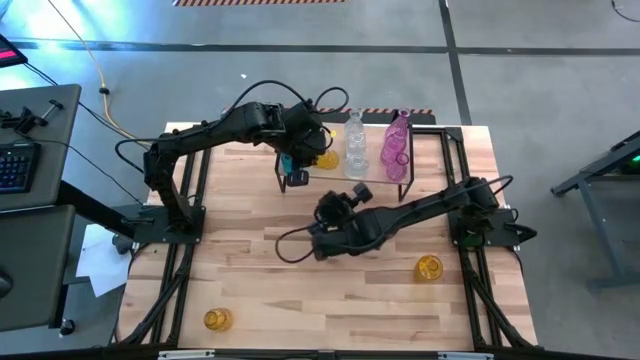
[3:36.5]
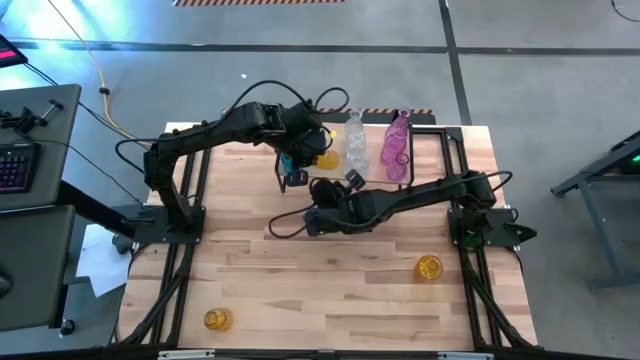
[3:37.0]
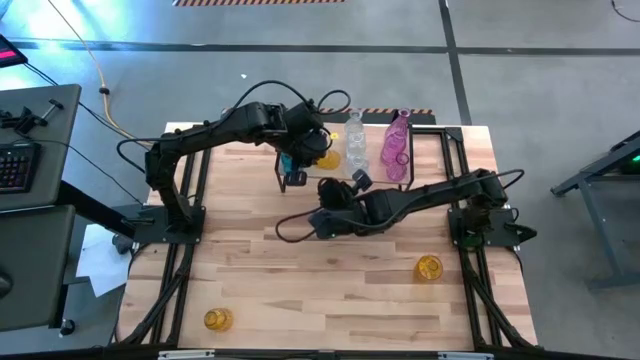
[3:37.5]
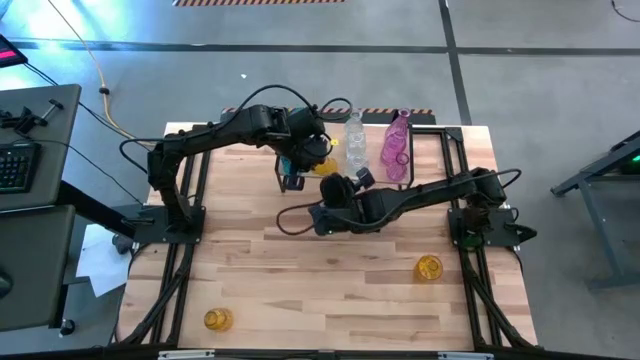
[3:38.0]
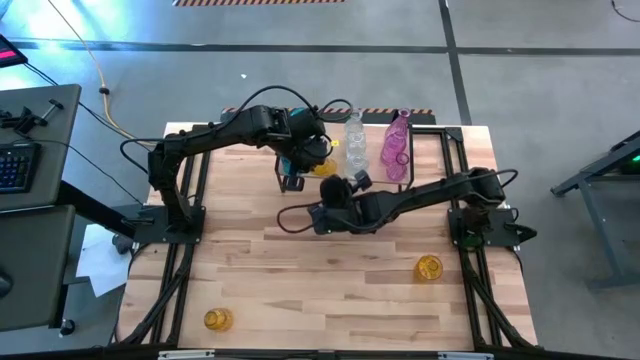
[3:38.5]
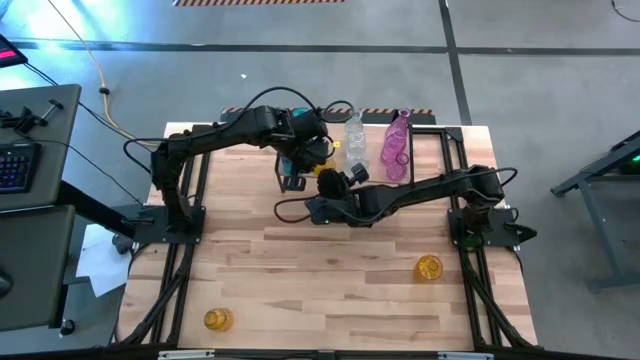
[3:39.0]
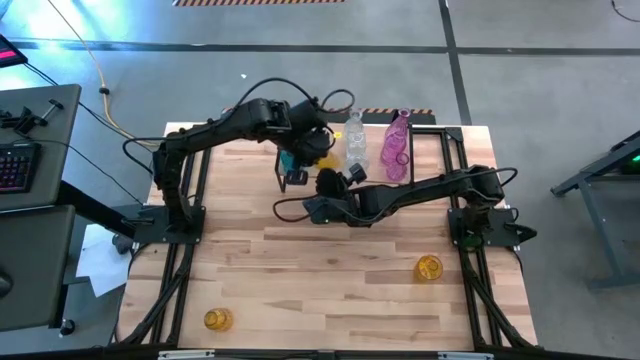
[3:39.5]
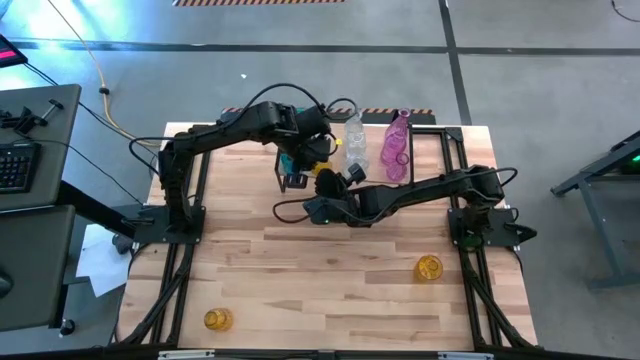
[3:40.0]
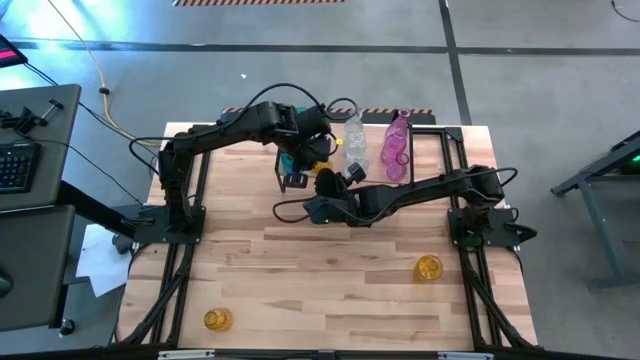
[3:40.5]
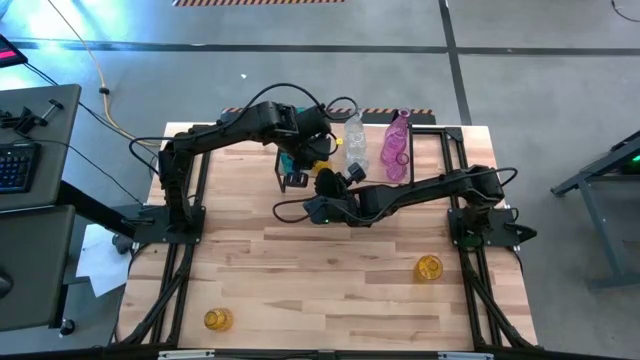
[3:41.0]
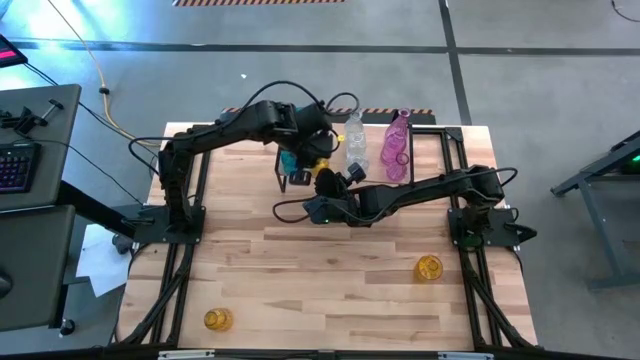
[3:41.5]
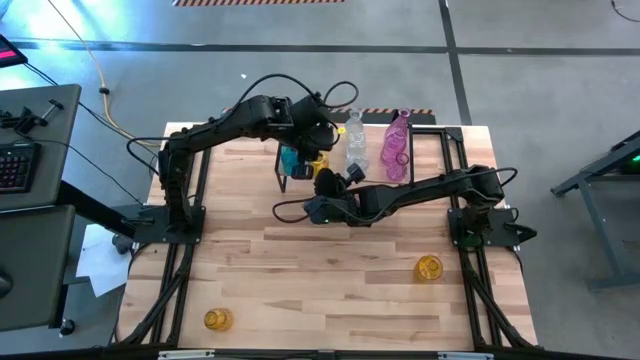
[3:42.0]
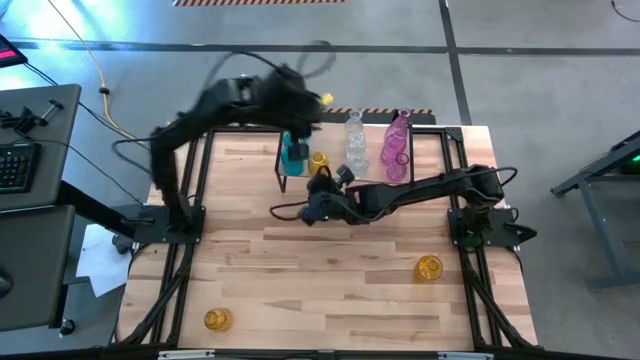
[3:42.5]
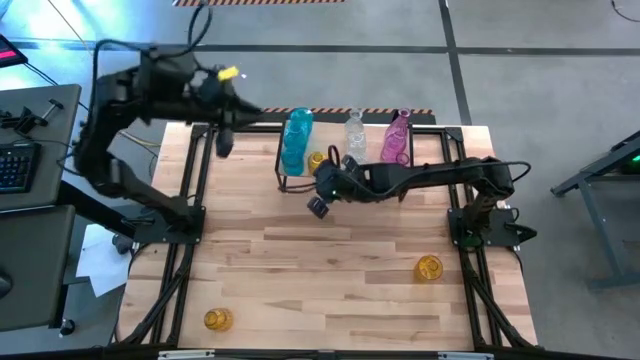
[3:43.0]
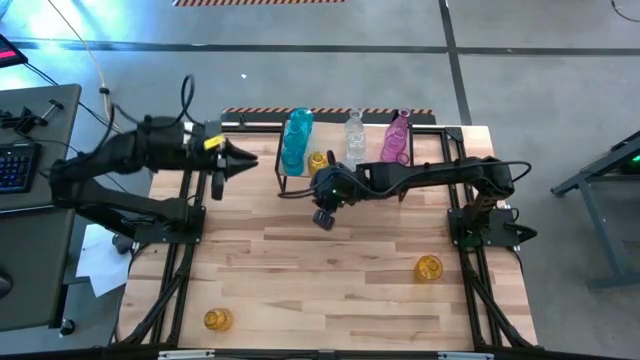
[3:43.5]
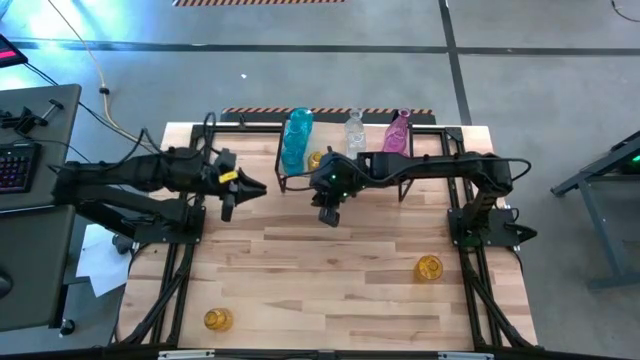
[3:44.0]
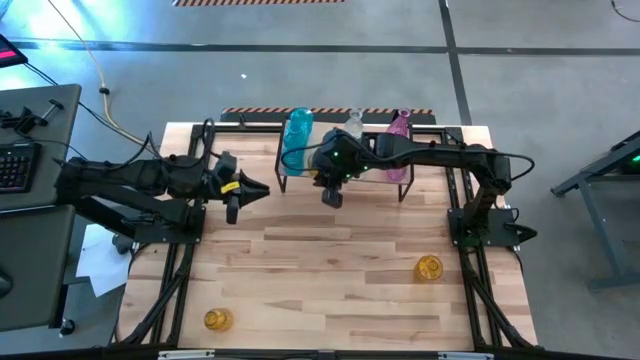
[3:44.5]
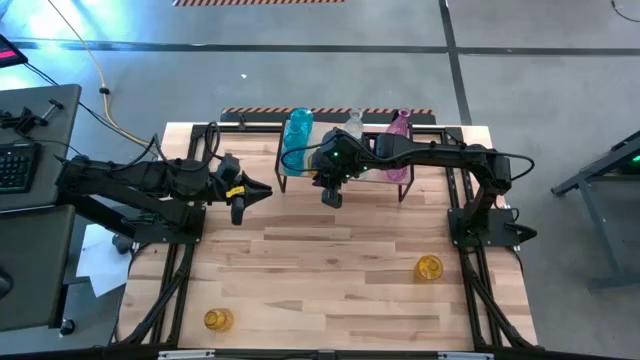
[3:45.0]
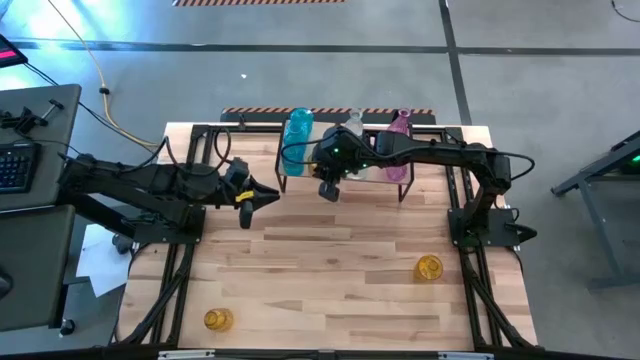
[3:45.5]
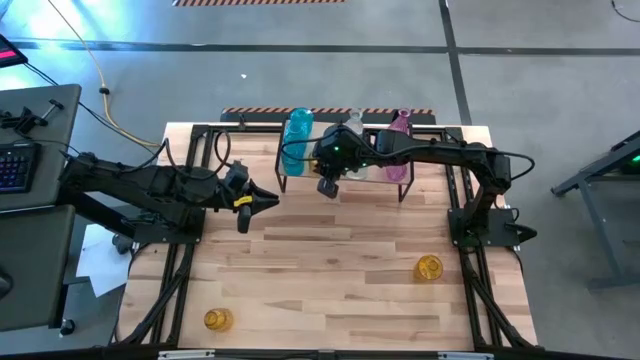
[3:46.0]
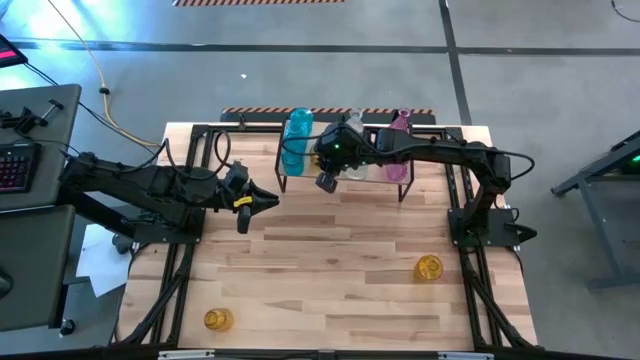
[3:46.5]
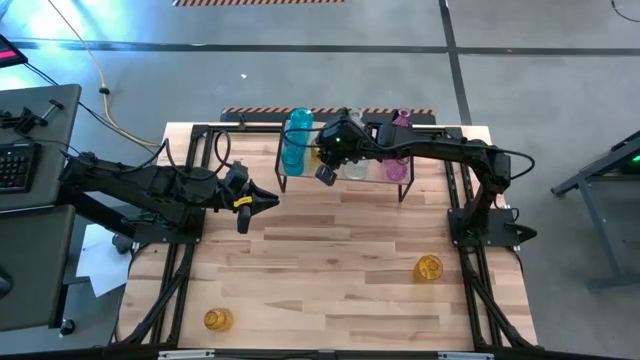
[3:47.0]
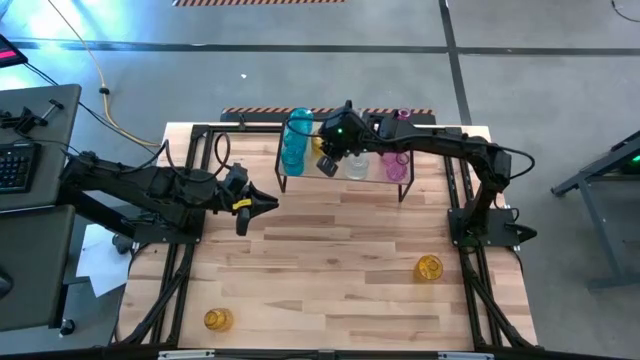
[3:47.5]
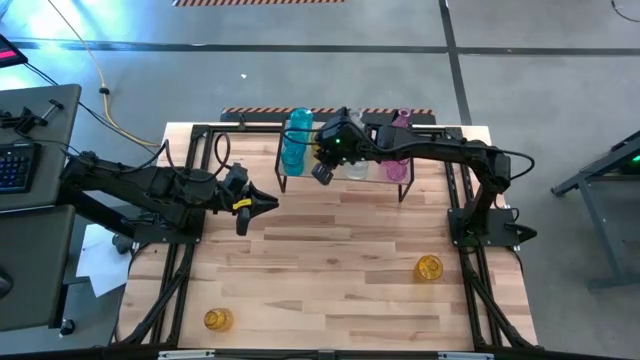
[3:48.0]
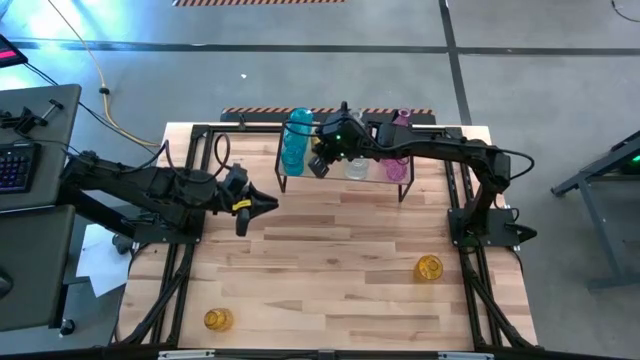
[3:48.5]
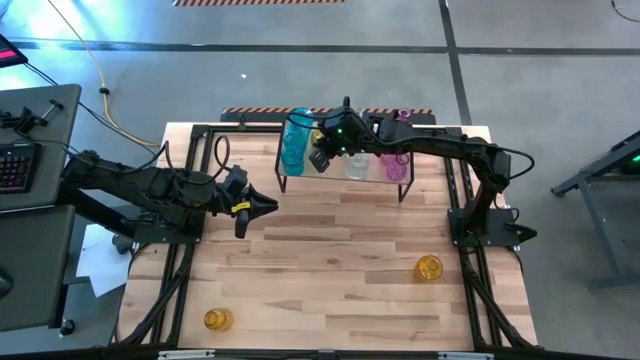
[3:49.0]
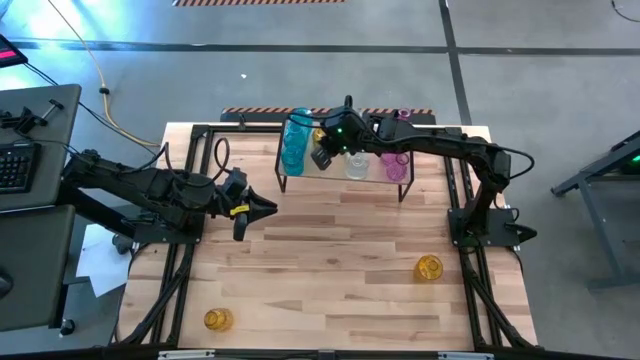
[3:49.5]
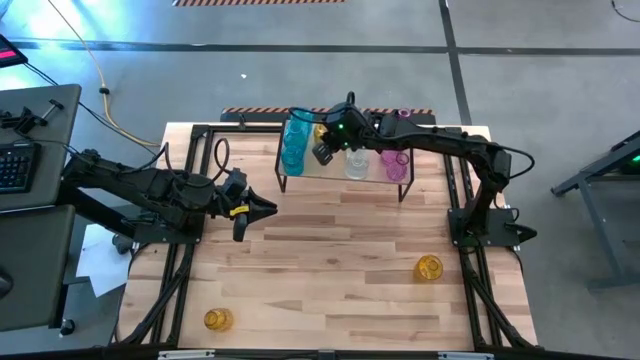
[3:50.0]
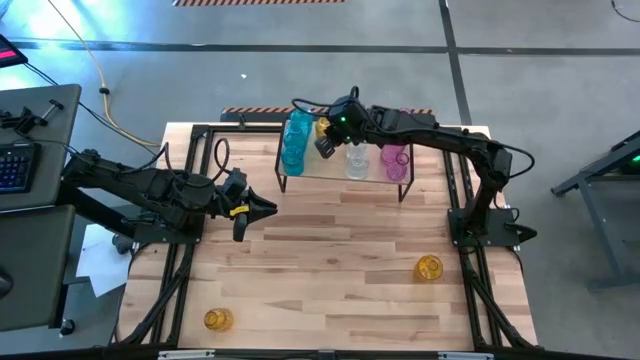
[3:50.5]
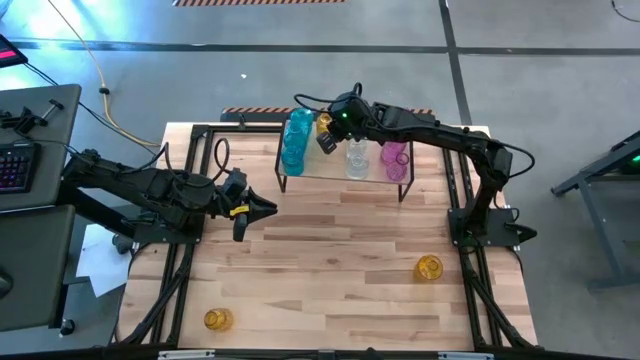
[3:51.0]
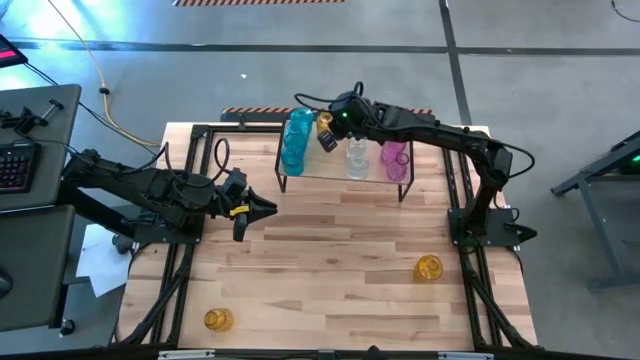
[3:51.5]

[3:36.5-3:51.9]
Task: sort vases onto shelf
Put the top left yellow vase on the shelf

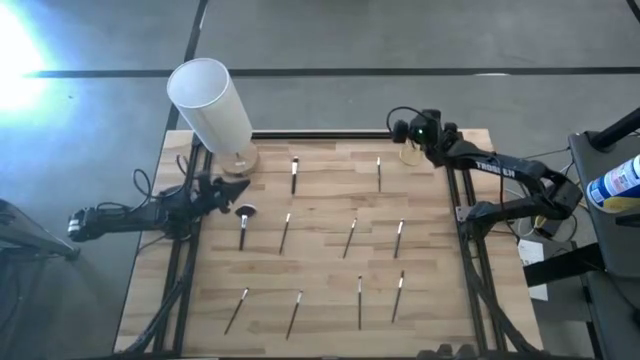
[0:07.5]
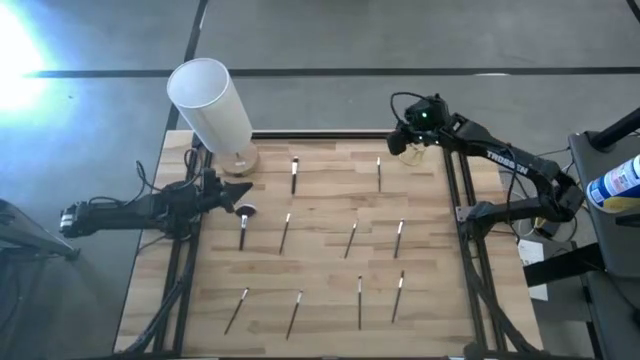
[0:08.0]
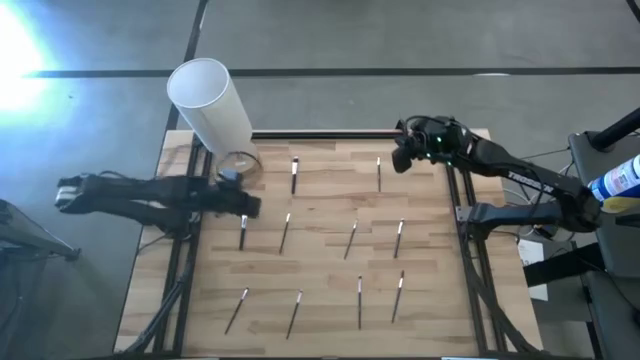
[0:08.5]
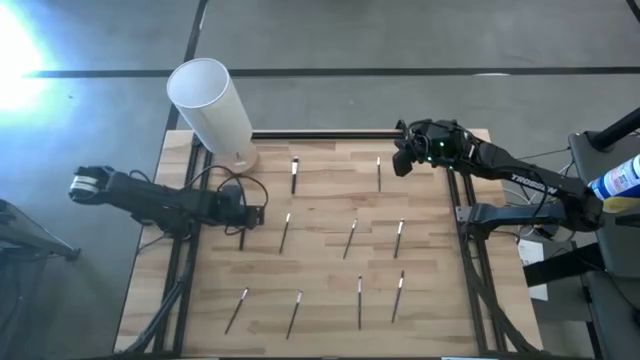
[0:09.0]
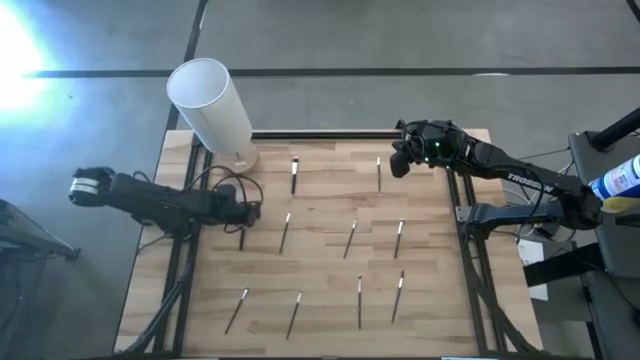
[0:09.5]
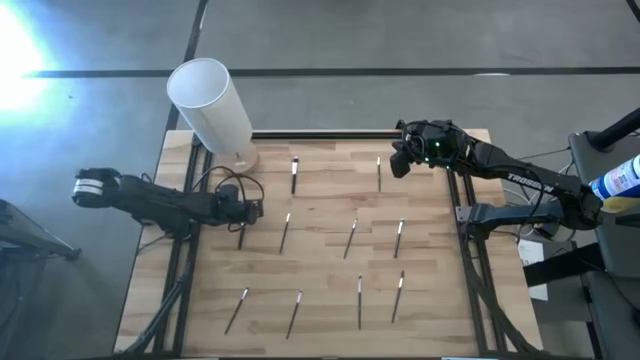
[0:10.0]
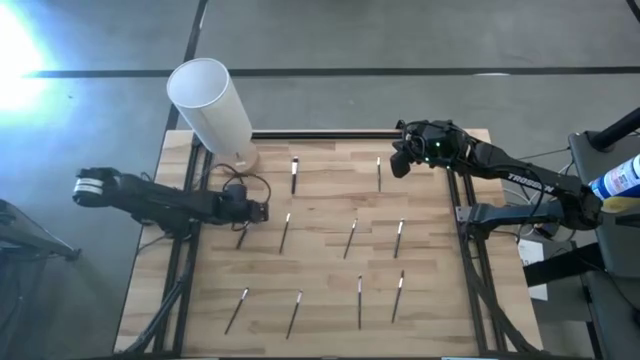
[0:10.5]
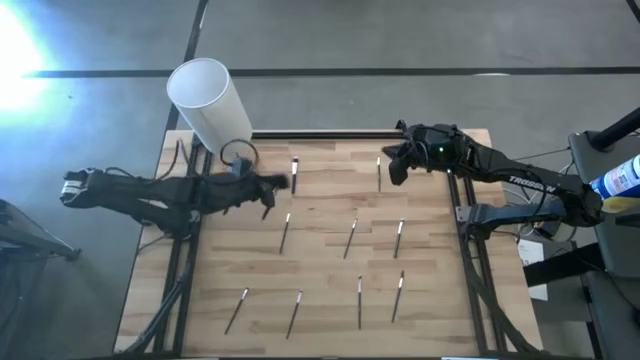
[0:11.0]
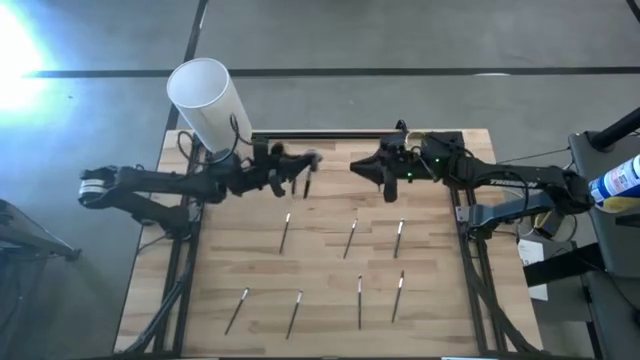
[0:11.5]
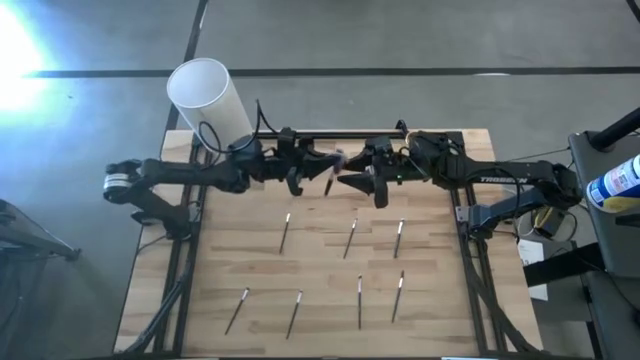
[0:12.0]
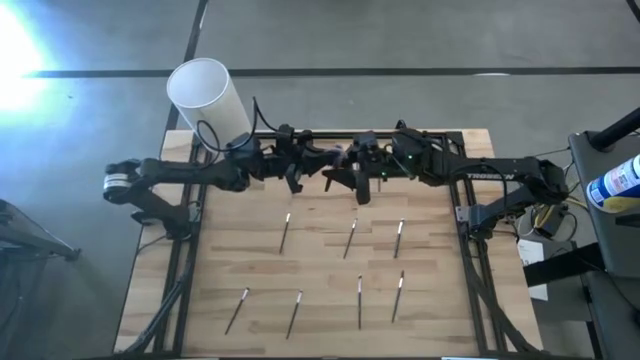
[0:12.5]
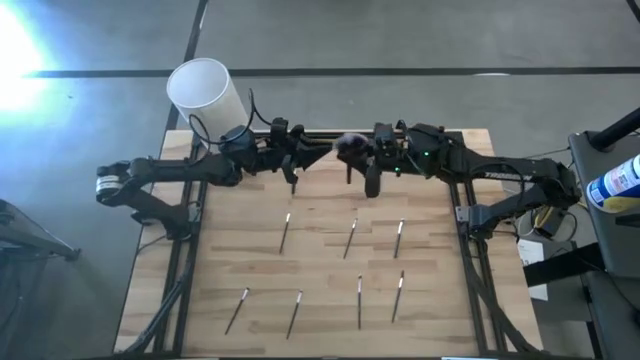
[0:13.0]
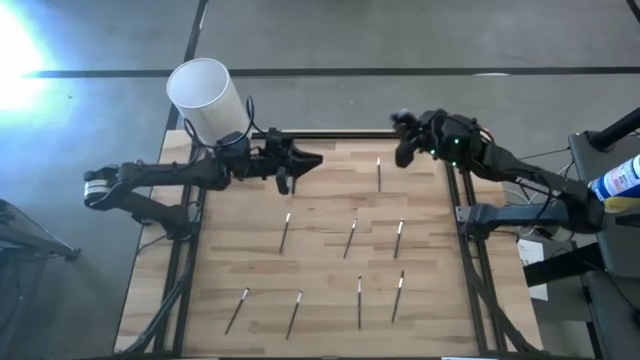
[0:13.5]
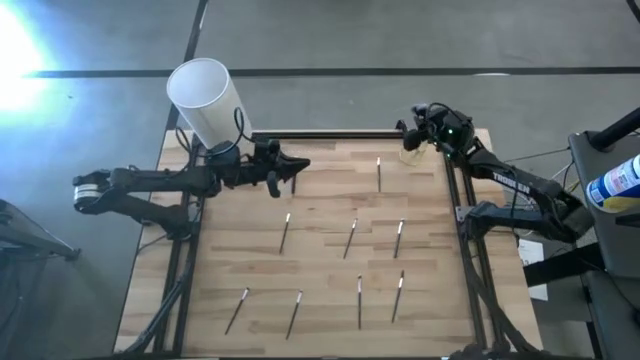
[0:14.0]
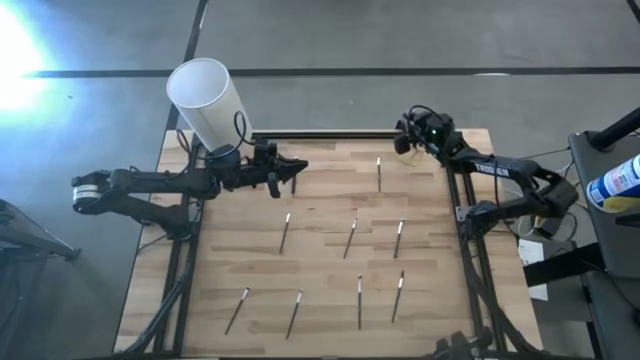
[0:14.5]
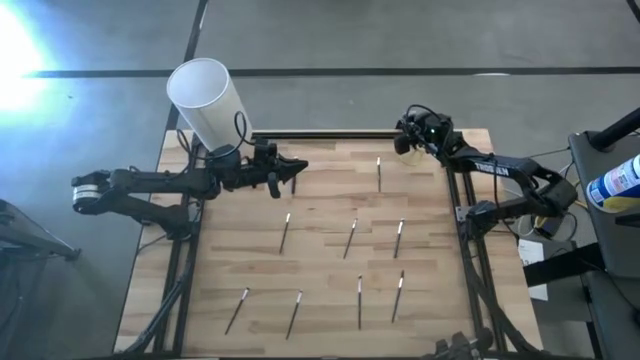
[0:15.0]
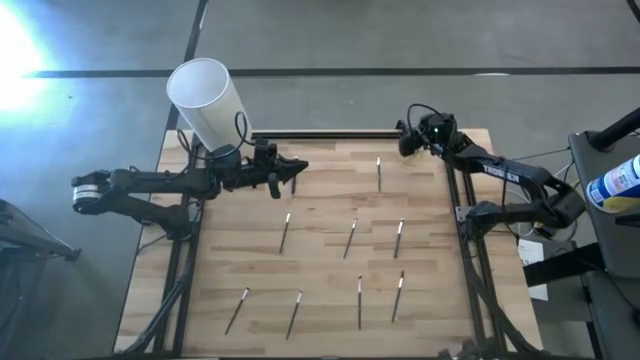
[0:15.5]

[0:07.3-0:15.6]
Task: Put items in baskets/containers
Put the highlighter brush into the yellow container
